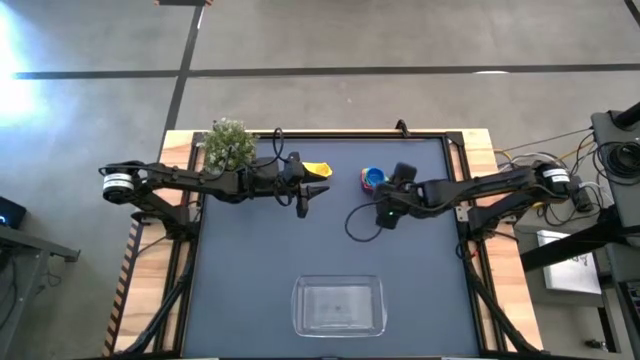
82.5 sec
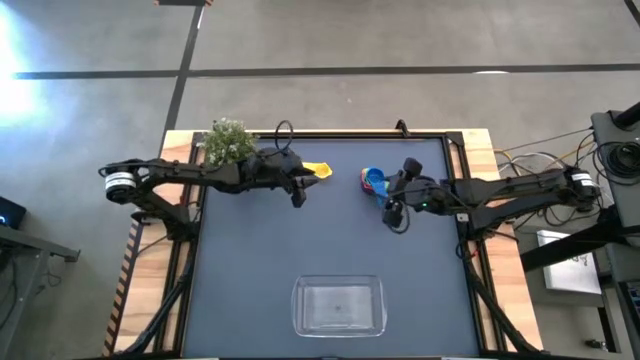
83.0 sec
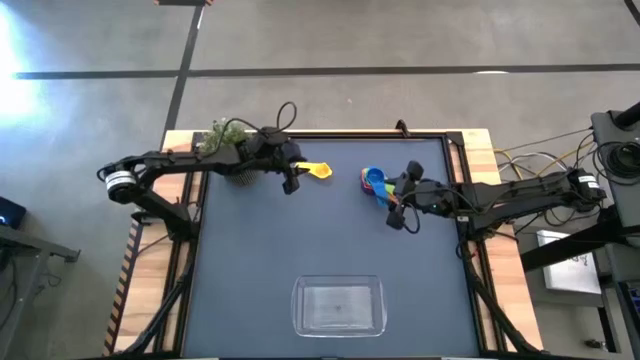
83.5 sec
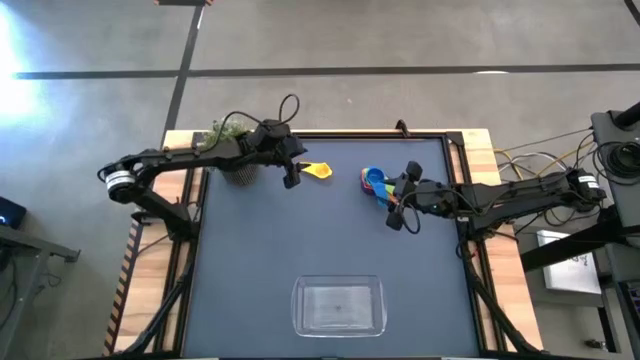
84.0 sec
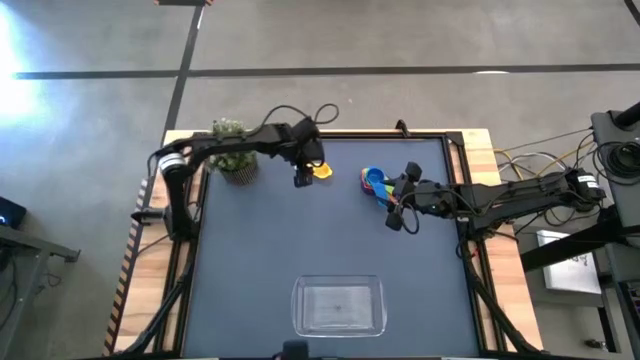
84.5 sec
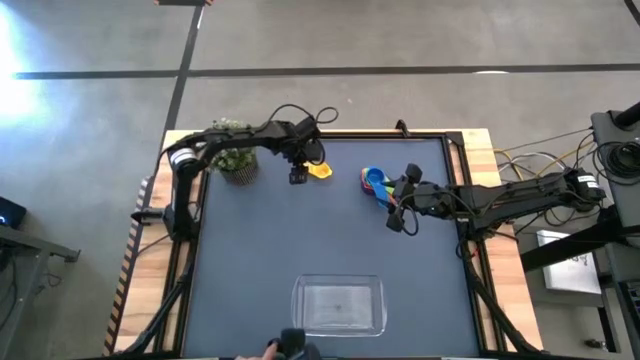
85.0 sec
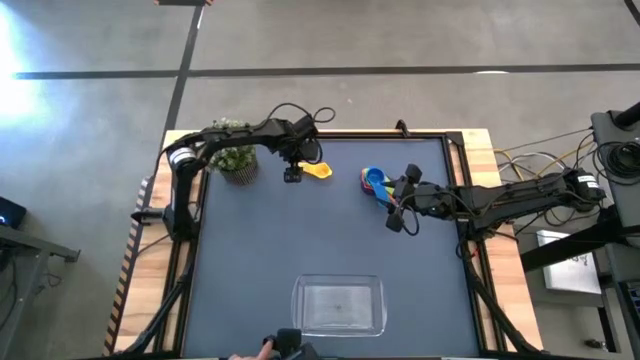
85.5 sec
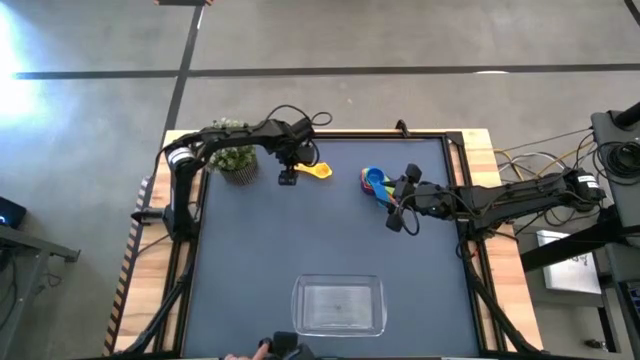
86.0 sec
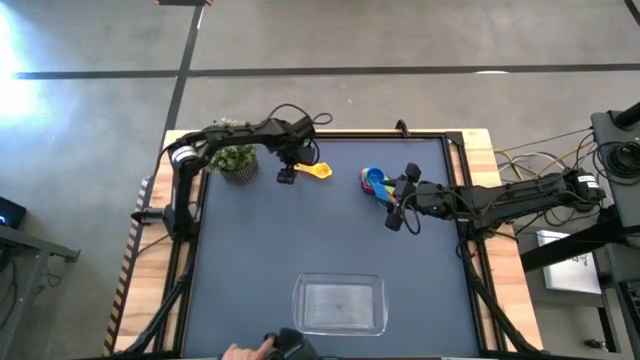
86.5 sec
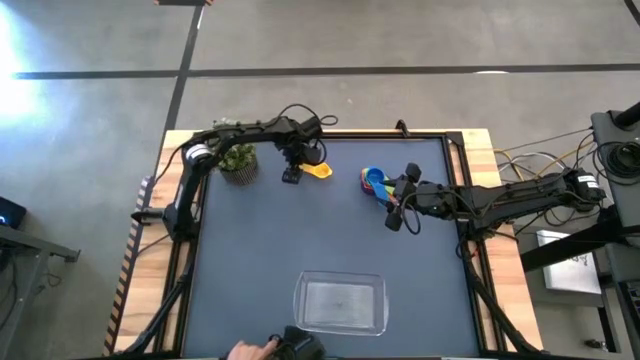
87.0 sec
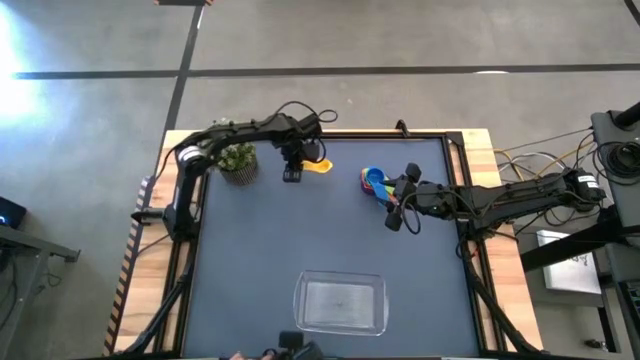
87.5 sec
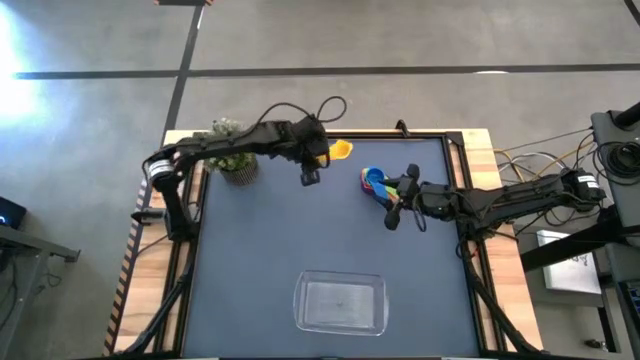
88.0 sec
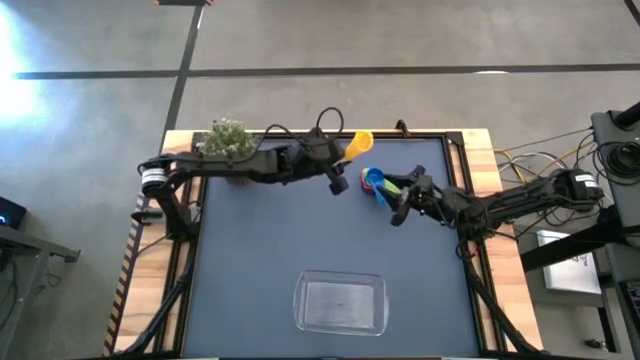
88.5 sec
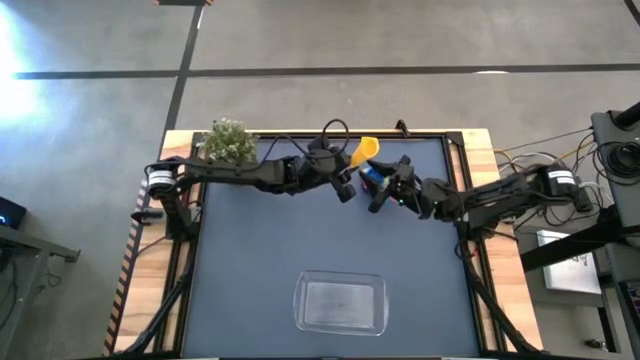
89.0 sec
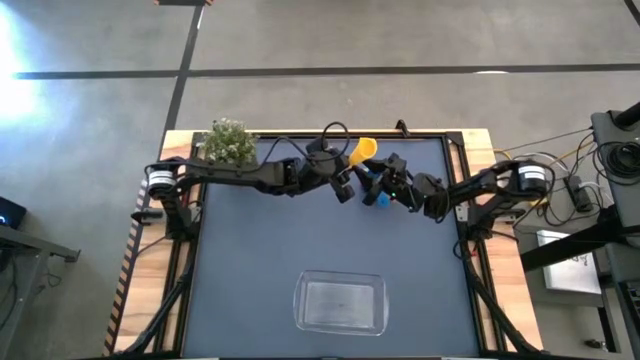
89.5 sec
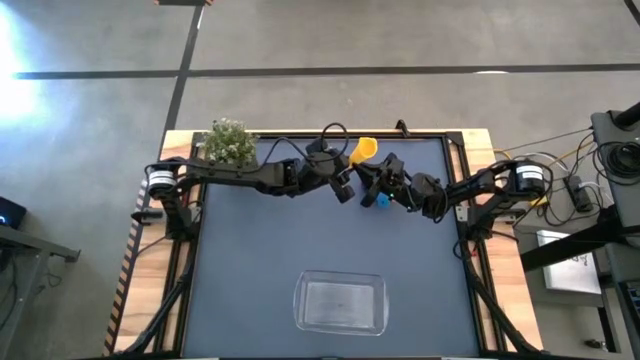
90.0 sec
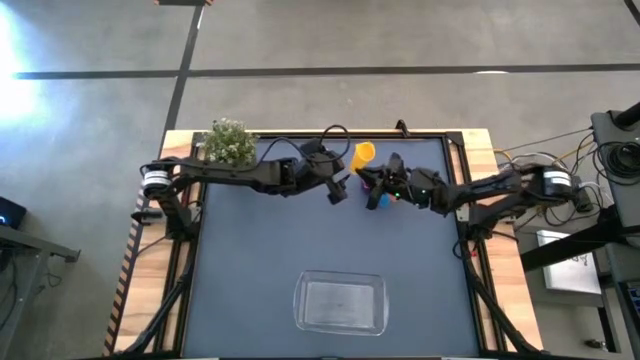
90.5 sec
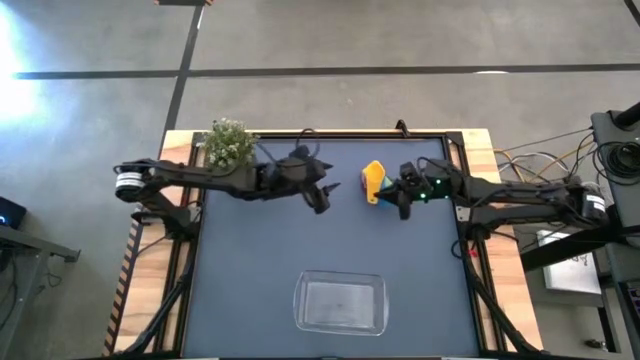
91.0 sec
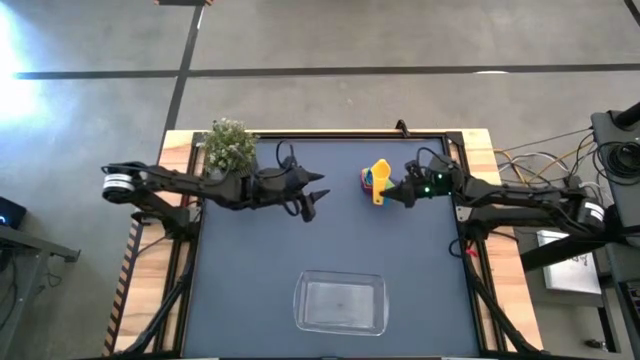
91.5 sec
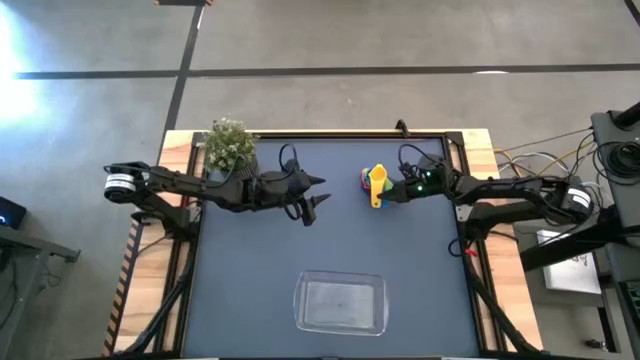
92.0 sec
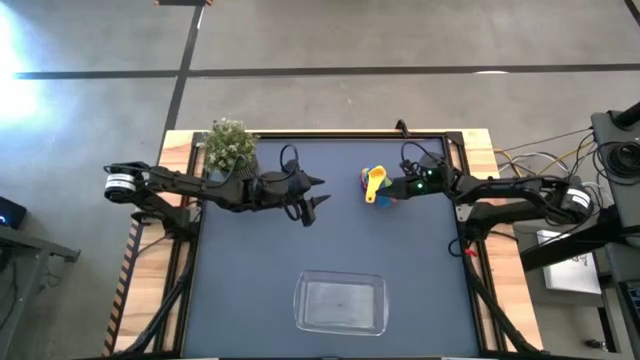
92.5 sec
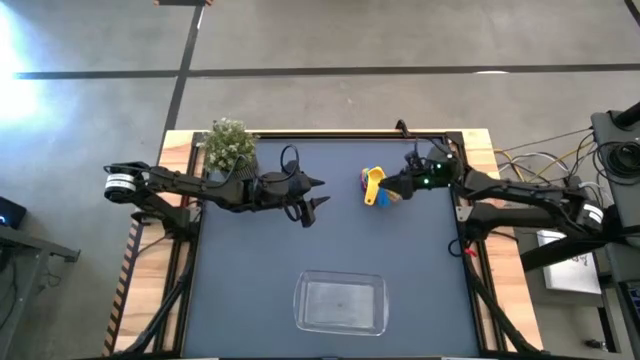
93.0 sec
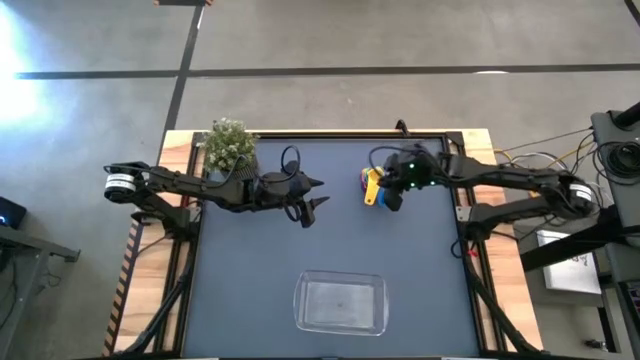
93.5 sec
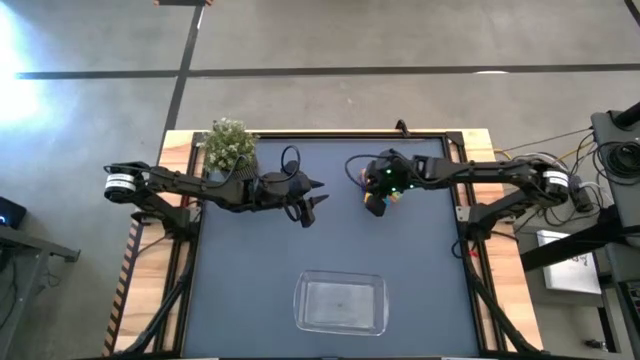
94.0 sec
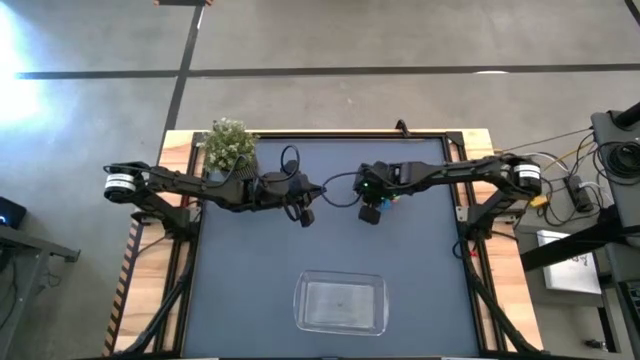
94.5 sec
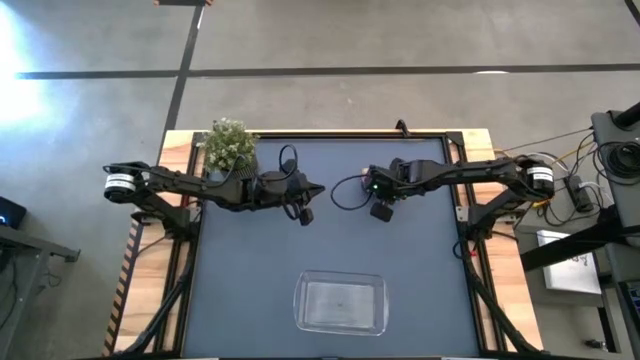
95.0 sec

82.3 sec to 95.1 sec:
Task: Nest measuring cups in basket
Stack the yellow measuring cup on the blue measuring cup

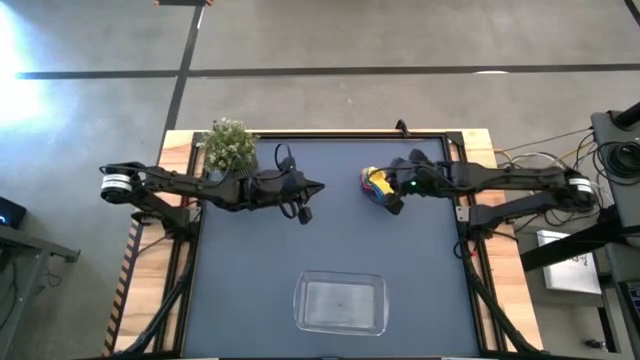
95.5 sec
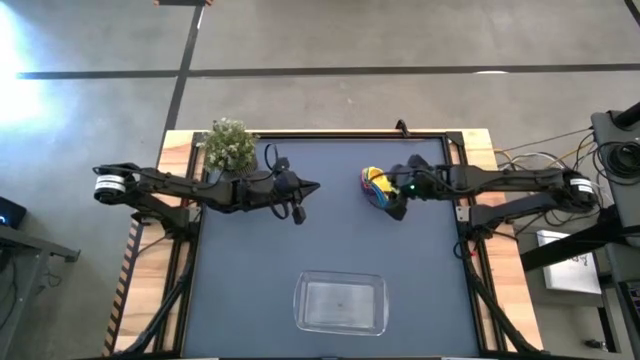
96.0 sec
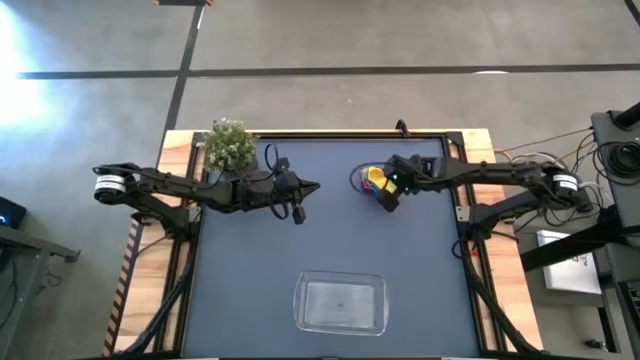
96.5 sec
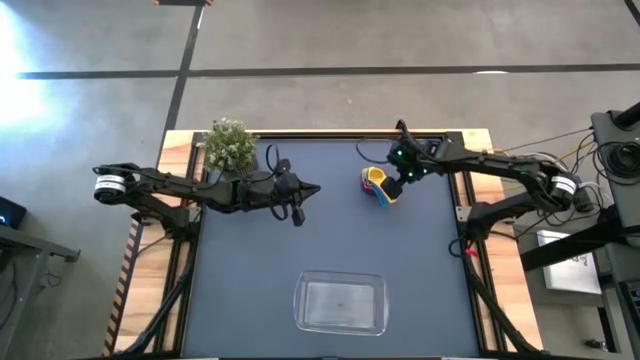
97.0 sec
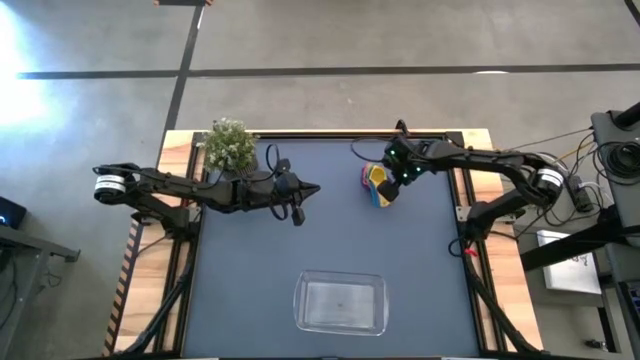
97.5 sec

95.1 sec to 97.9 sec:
Adjust the stacked measuring cups

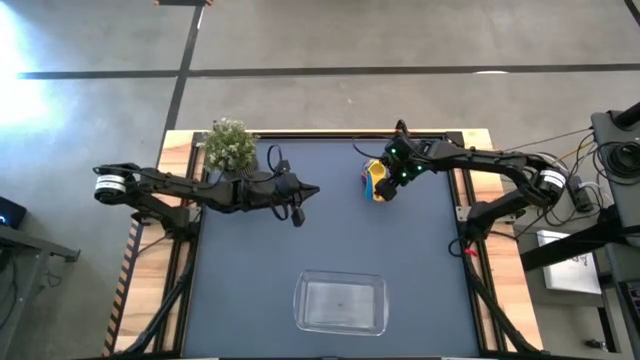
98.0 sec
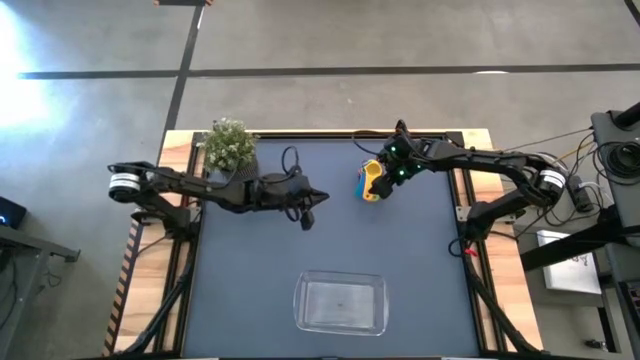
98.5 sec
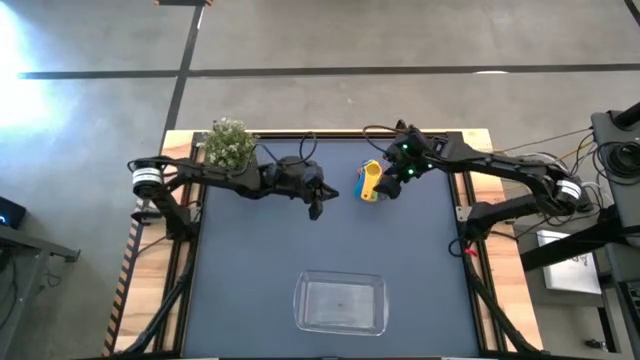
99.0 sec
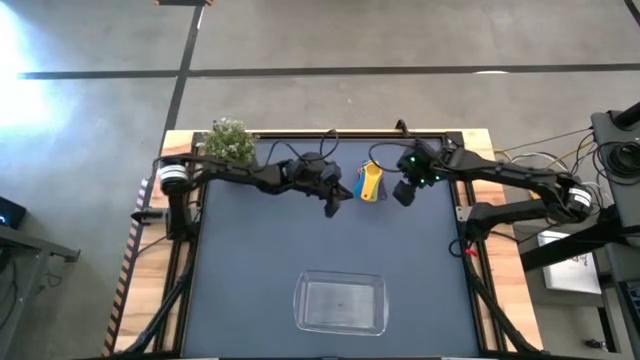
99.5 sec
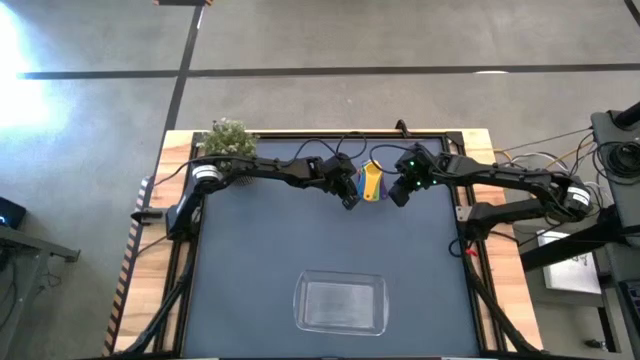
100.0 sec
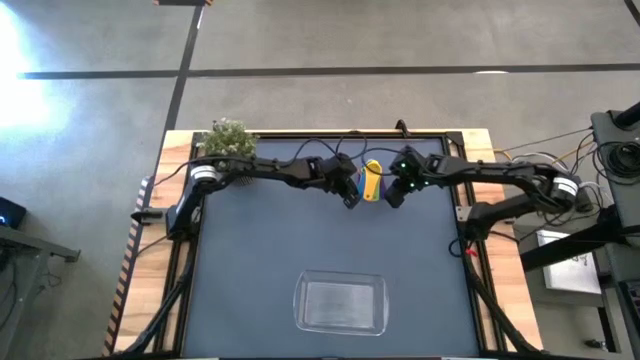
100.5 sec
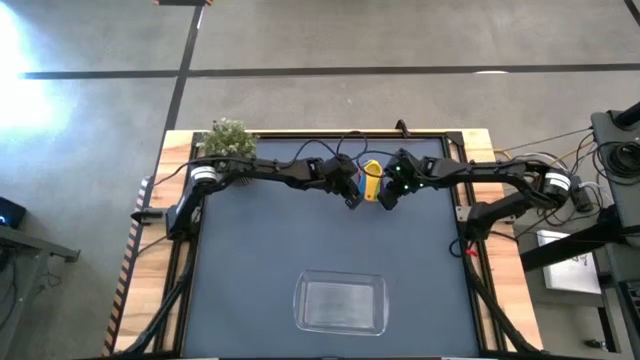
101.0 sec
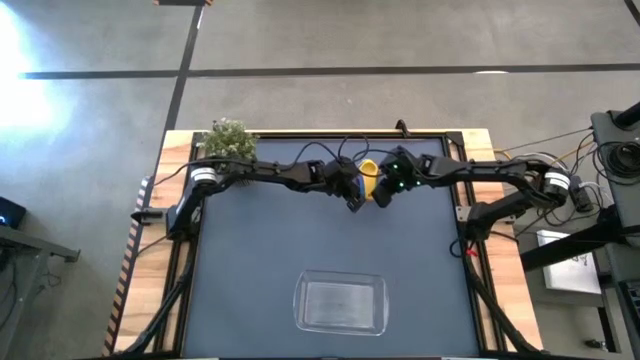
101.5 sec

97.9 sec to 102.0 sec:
Adjust the stacked measuring cups

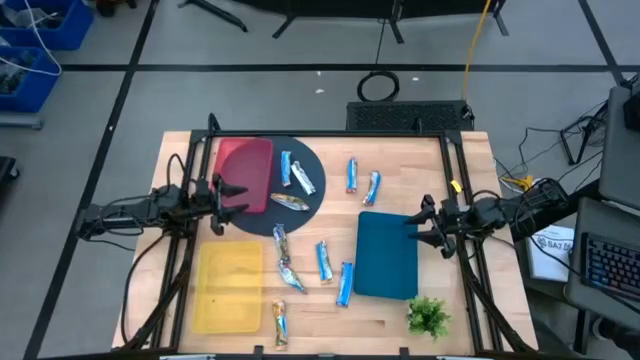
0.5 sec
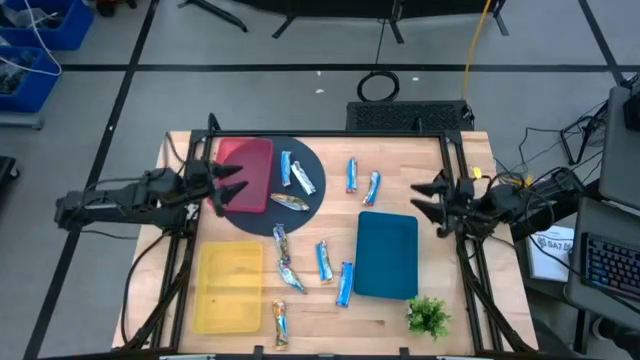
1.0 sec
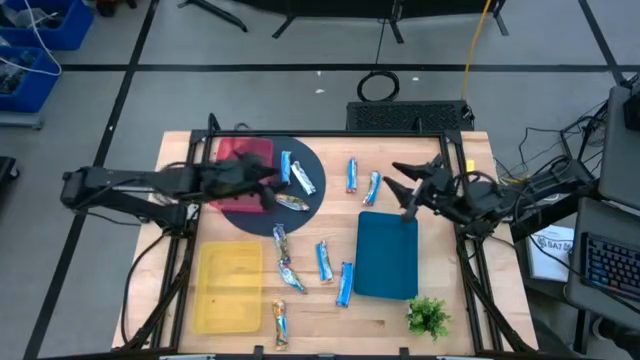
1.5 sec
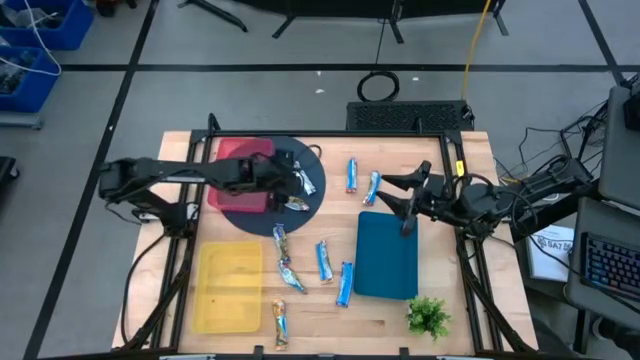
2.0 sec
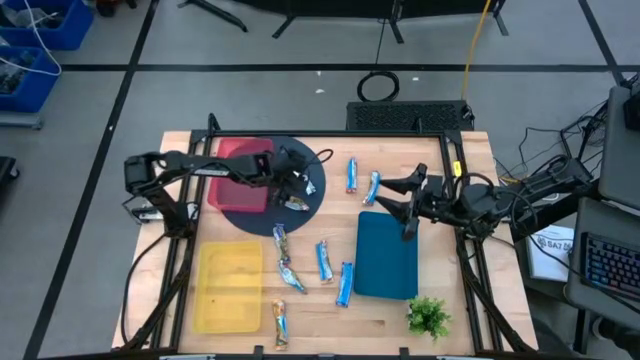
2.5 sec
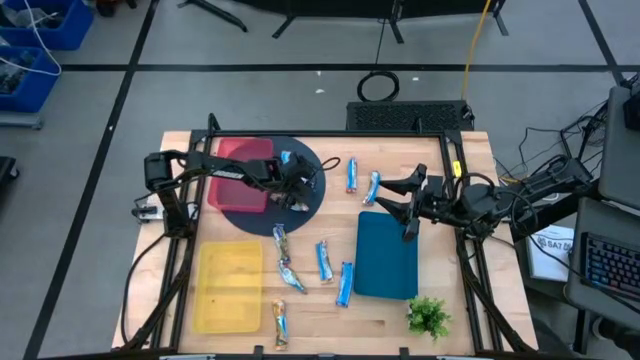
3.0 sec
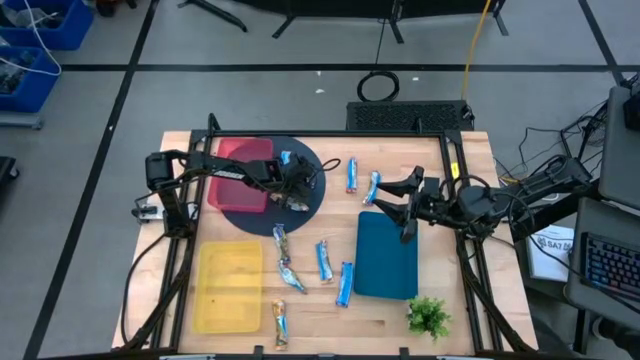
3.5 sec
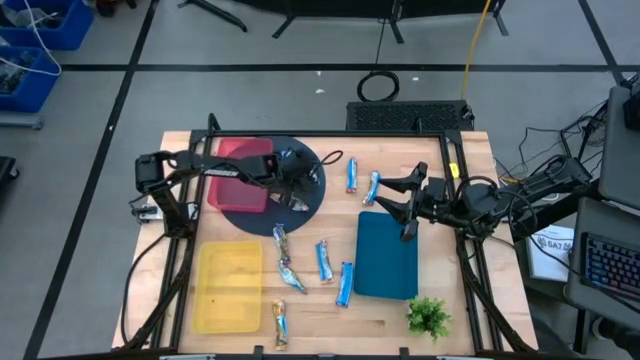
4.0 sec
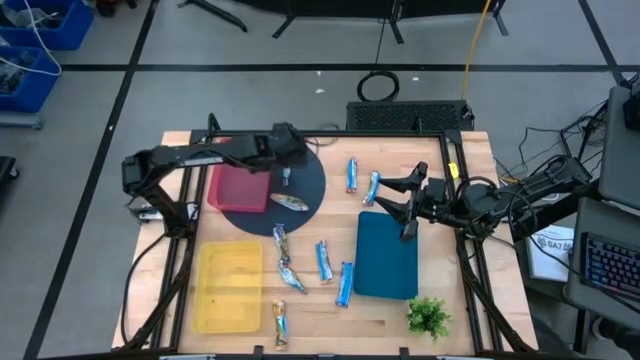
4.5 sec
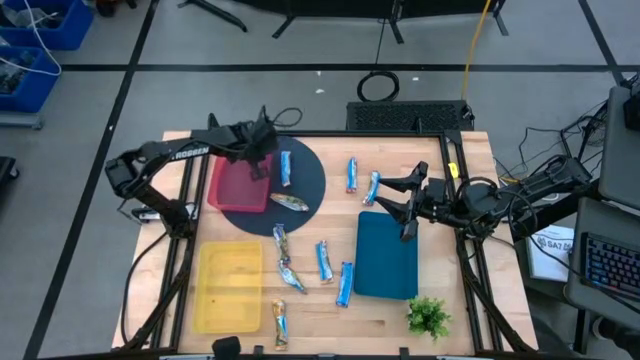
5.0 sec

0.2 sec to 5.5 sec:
Task: Pick and place Granola Bars by type
Put the top blue granola bar into the red bin
